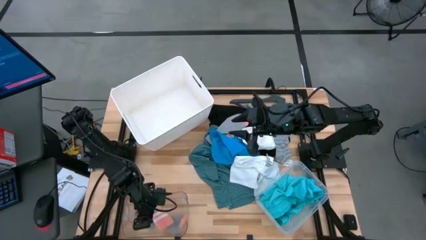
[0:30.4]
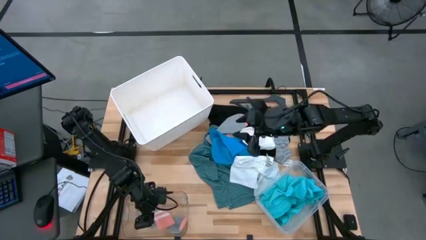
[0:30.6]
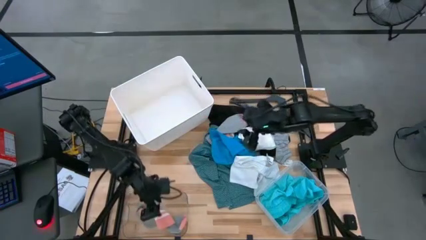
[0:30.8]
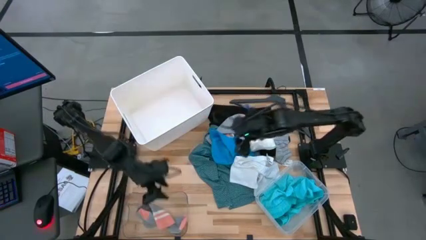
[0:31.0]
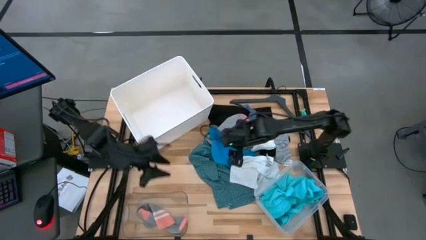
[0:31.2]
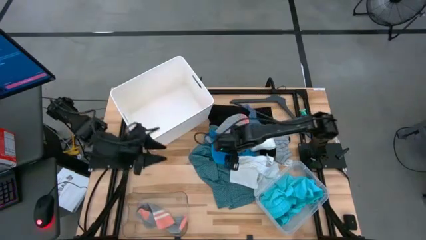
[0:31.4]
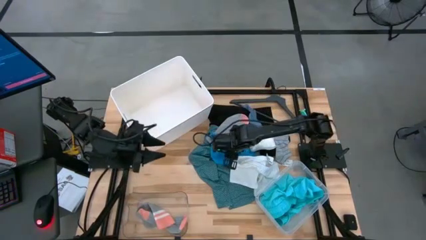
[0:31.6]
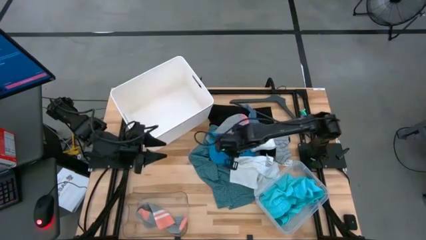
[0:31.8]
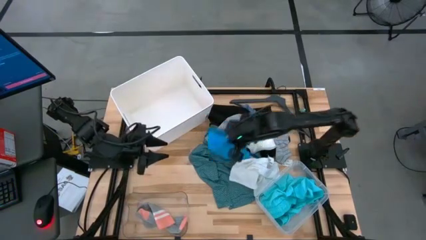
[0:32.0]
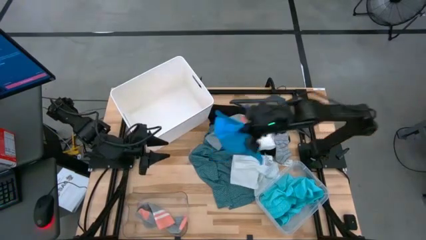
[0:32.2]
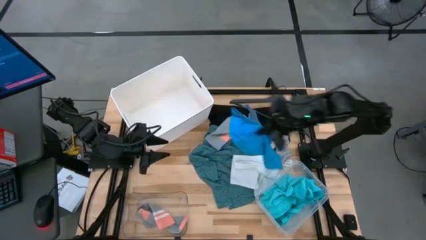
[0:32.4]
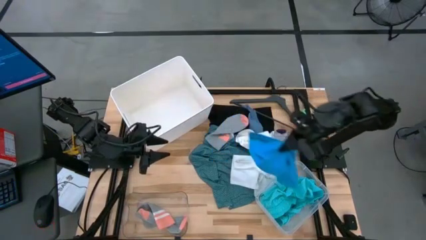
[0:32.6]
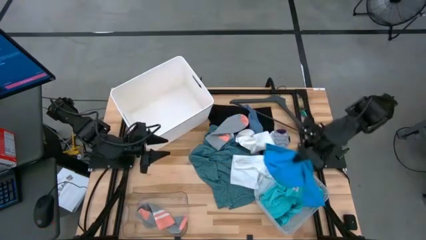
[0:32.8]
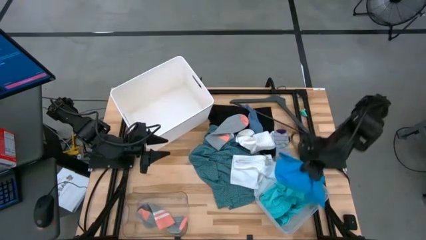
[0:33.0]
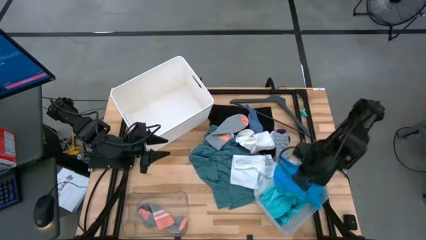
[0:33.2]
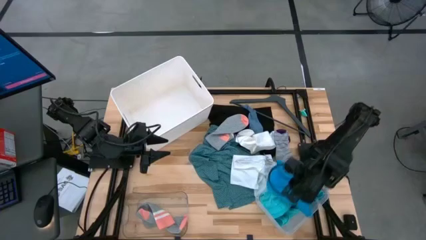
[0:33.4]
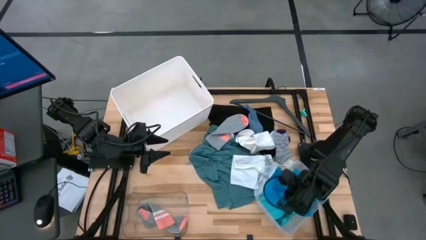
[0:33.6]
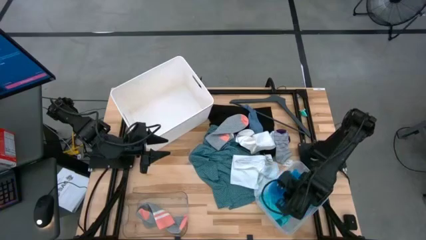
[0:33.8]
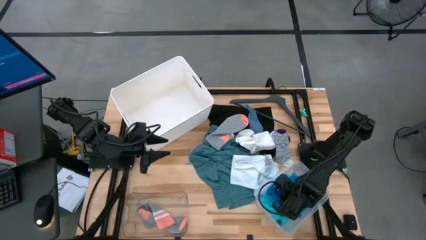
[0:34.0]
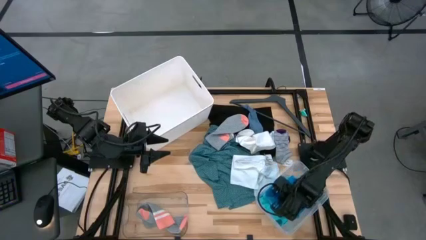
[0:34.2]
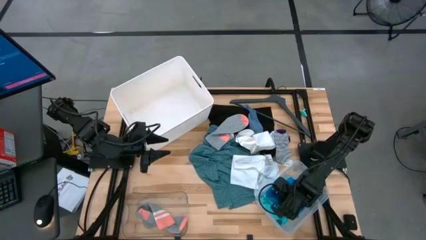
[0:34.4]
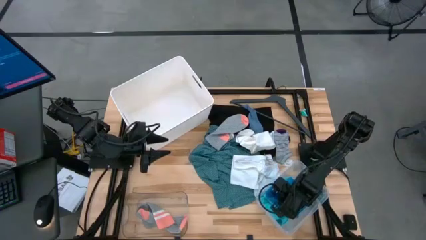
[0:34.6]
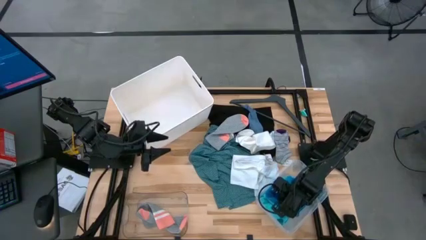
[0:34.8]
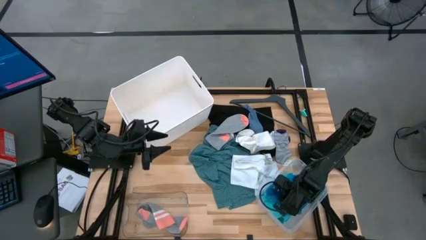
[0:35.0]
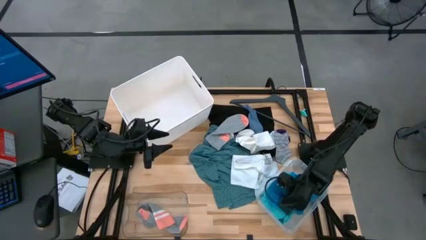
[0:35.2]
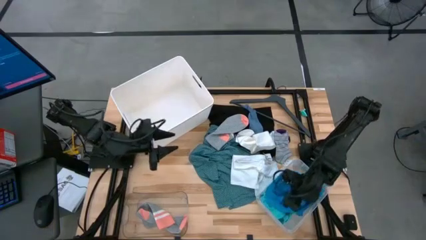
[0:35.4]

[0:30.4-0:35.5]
Task: Pick & Place Cloths
Put the blue shorts into the right transparent bin

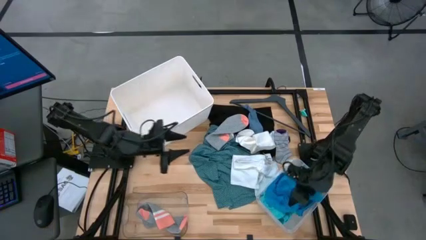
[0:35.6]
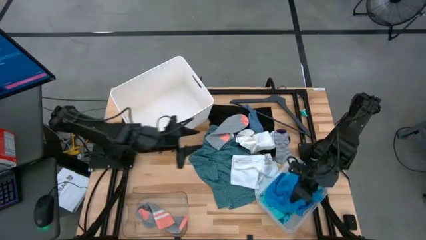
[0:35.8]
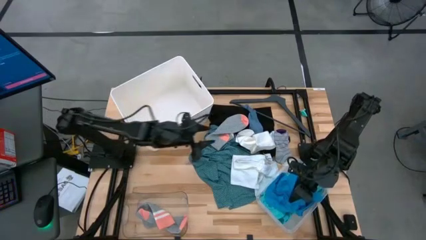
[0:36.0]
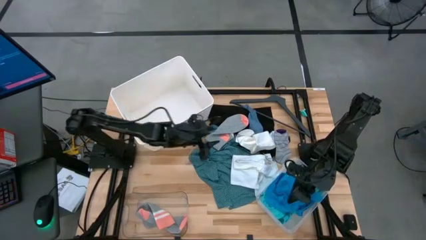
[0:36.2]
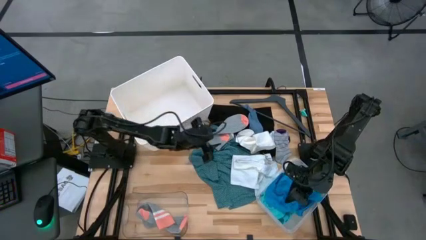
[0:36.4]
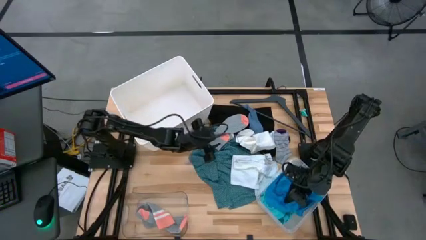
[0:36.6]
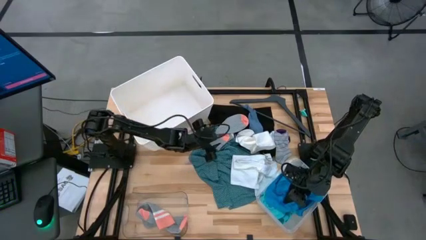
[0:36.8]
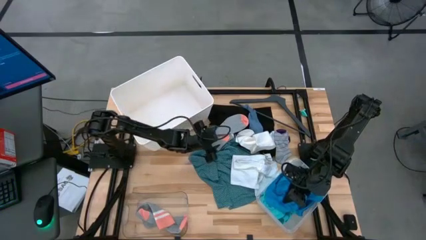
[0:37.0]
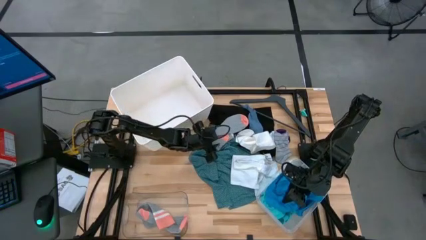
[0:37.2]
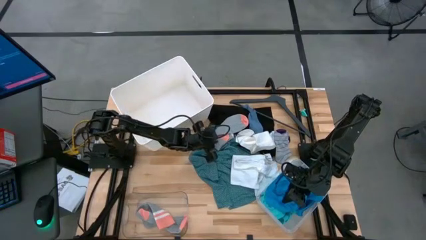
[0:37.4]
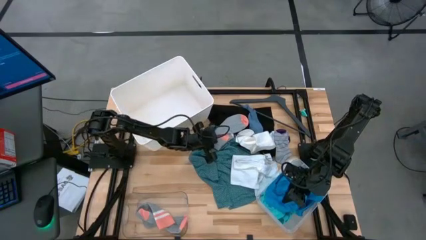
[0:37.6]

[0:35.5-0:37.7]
Put the gray and pink sock into the left transparent bin

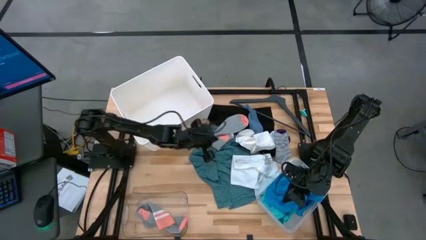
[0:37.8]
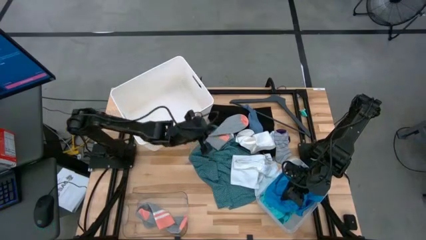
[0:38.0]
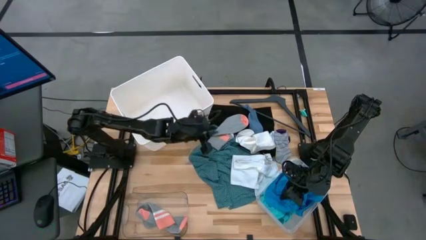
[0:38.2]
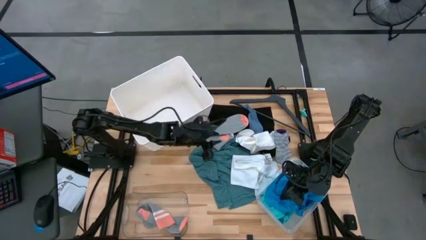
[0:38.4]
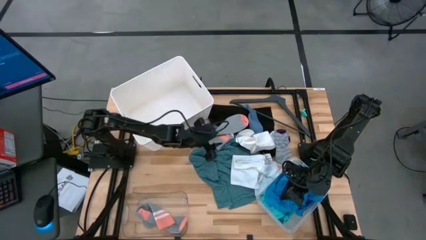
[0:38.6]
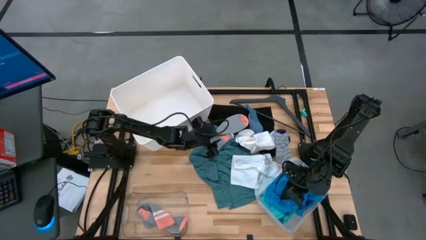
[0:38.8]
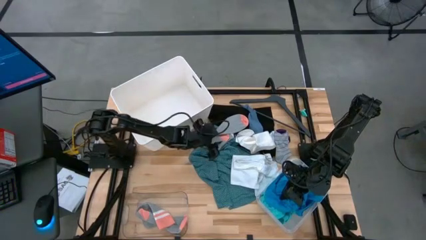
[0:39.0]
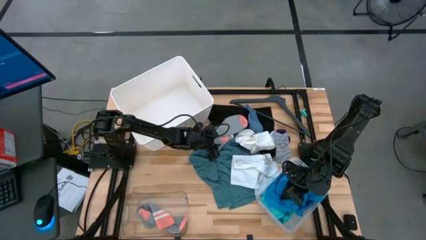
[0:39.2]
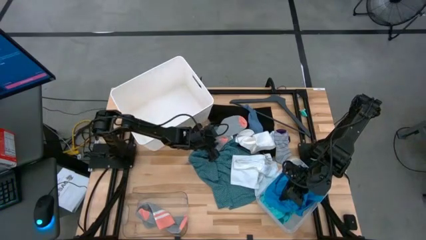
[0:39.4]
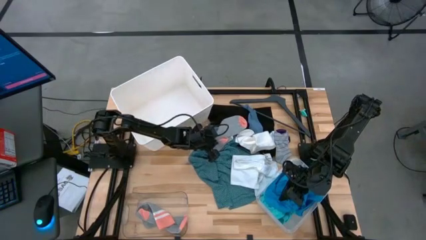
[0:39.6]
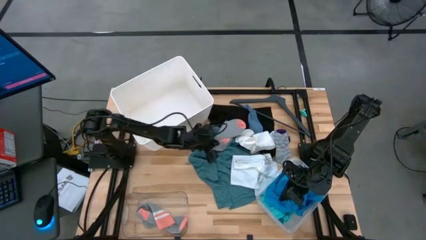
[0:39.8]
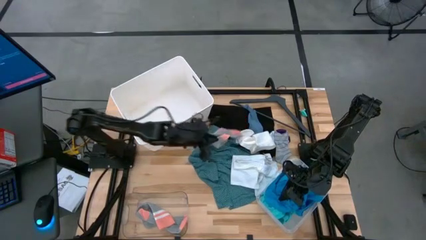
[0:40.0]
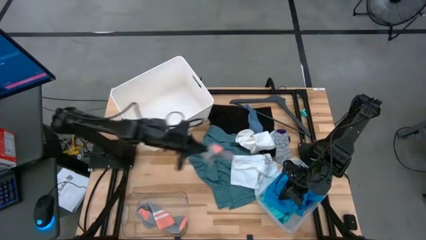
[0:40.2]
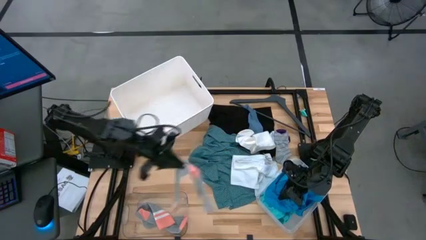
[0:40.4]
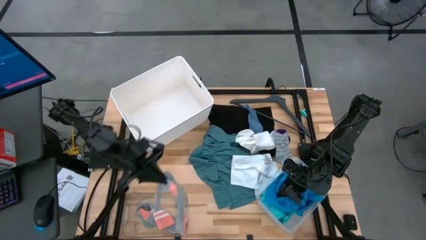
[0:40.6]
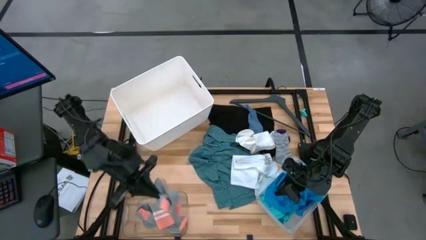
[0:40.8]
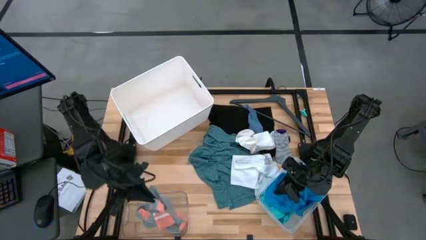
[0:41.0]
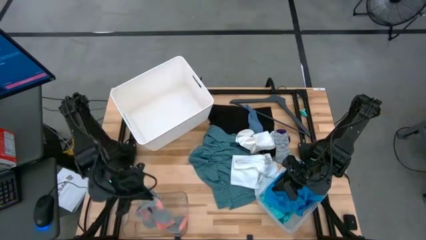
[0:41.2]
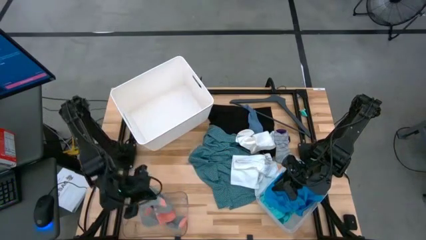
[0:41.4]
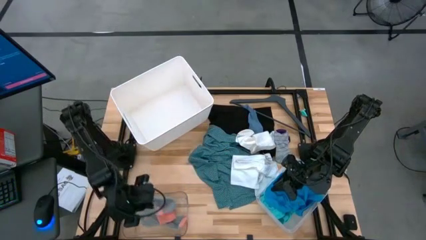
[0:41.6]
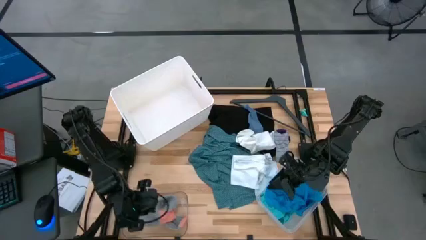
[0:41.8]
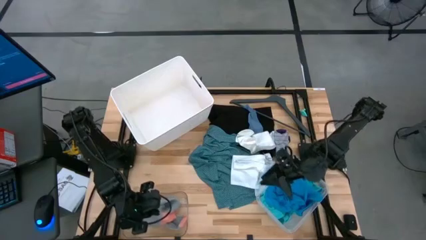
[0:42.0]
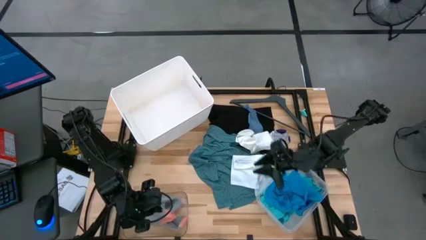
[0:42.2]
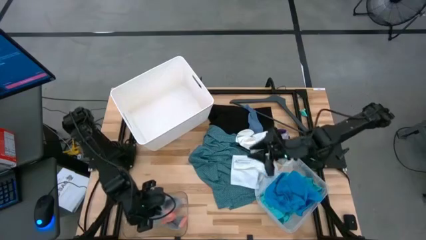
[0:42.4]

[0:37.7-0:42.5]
Put the gray and pink sock into the left transparent bin

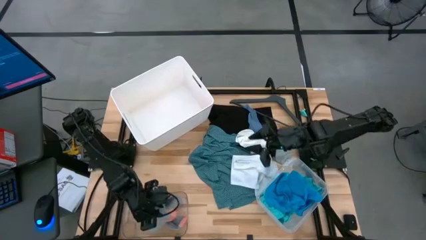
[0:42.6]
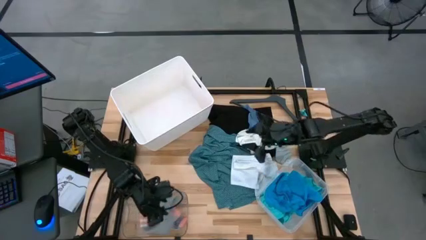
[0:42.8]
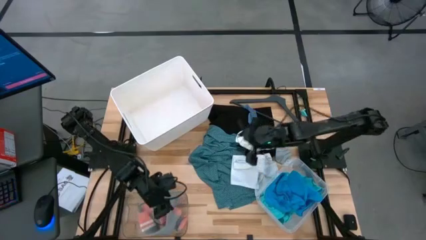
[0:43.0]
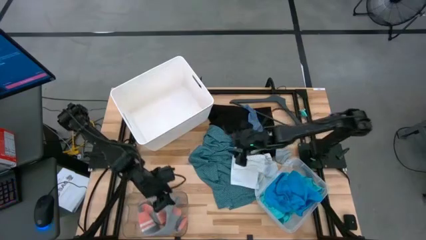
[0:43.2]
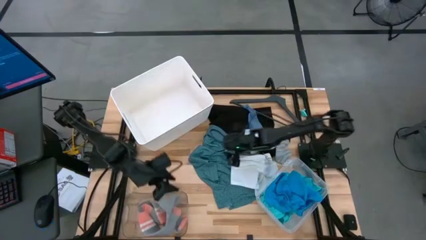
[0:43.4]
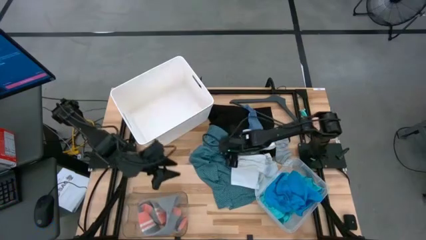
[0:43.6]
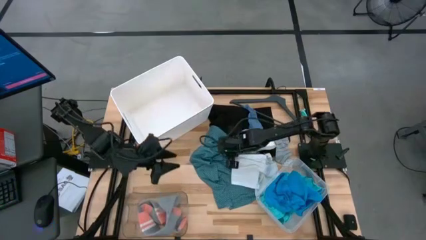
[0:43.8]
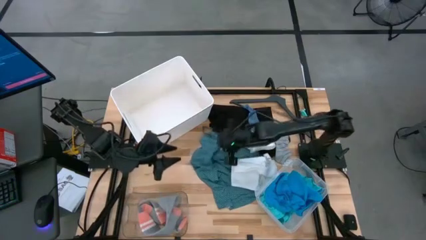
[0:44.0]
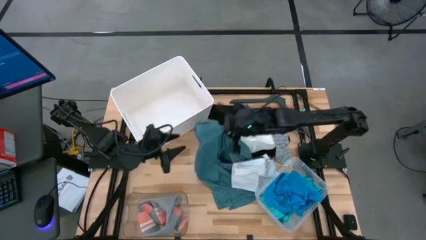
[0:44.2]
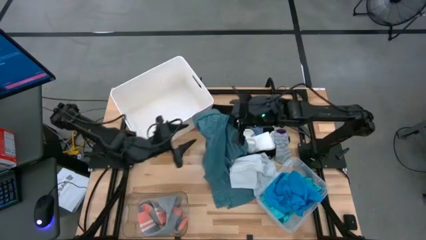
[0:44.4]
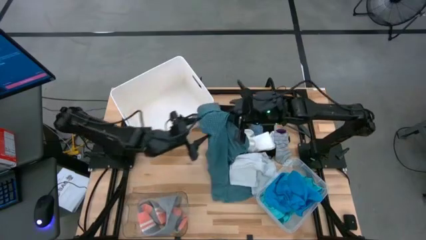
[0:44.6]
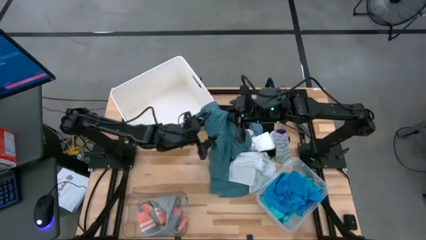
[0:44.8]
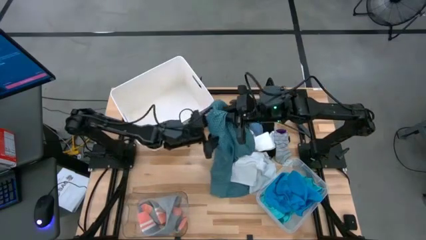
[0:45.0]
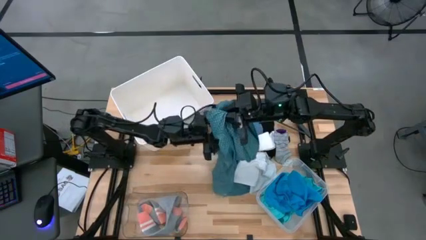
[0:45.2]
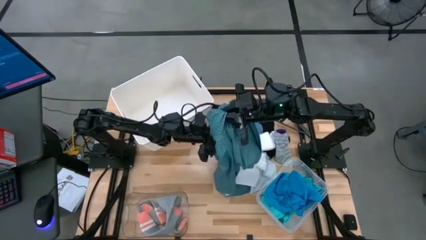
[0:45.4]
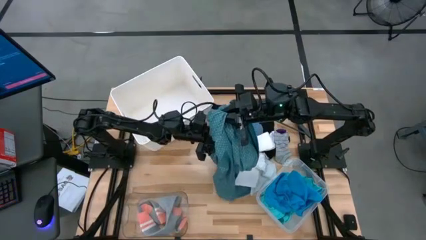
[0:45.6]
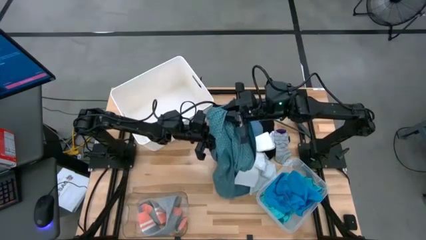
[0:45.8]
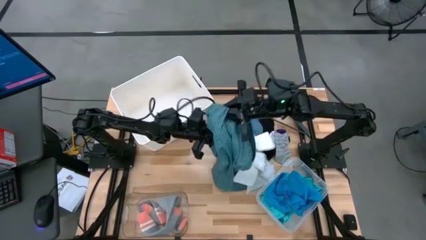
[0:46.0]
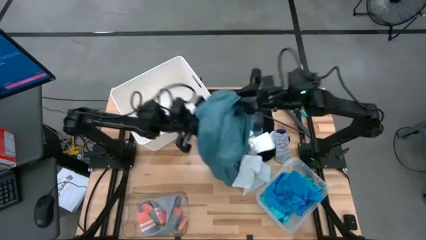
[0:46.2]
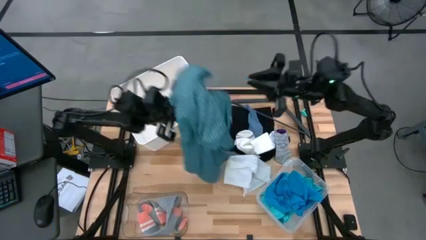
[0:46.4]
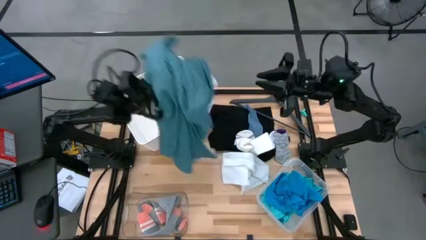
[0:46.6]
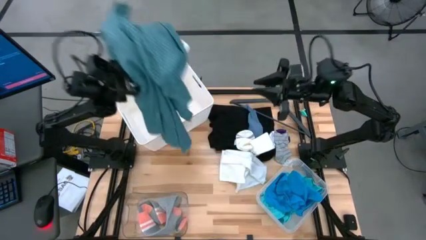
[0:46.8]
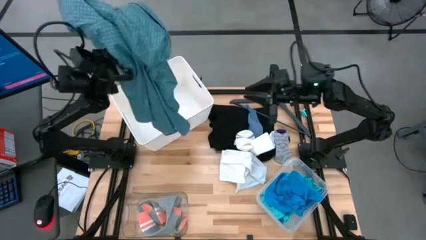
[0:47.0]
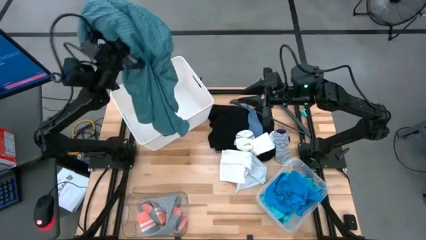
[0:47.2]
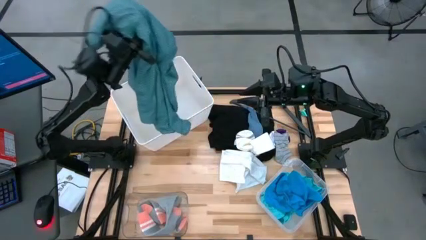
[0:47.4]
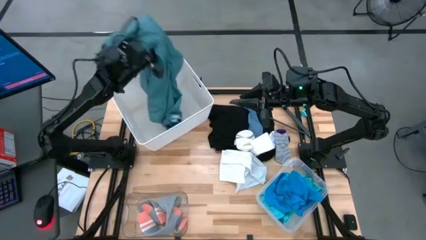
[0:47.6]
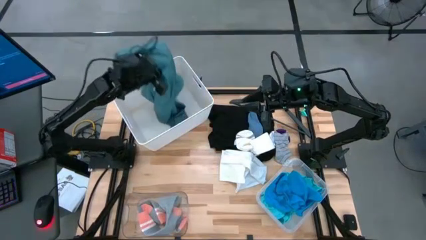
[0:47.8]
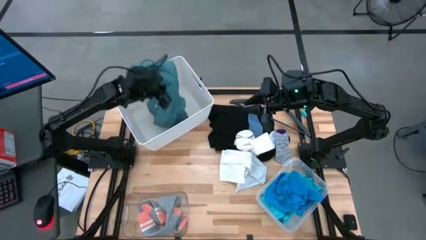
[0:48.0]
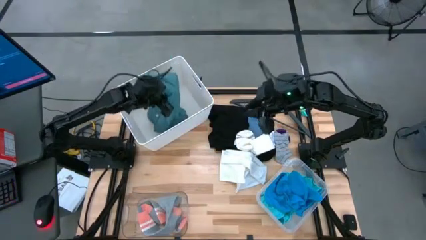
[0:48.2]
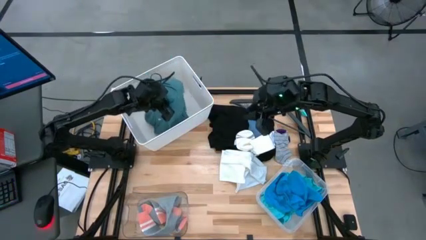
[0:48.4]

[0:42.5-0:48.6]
Put the green patterned long-sleeve polo into the white bin
